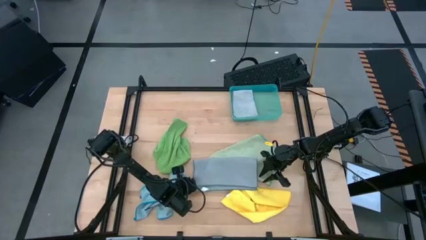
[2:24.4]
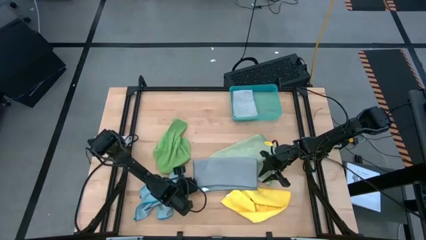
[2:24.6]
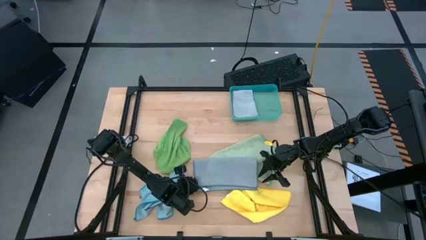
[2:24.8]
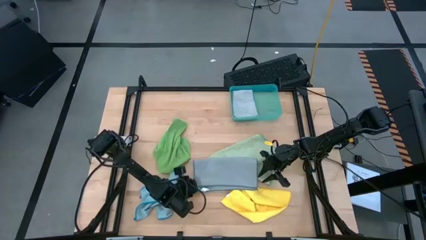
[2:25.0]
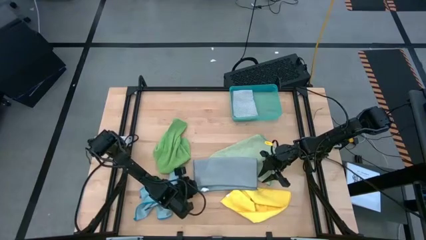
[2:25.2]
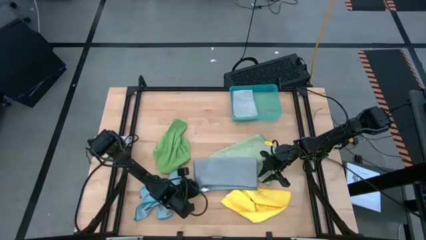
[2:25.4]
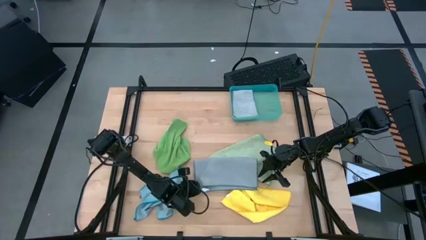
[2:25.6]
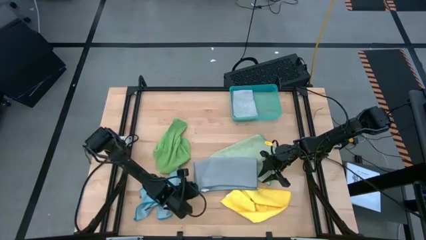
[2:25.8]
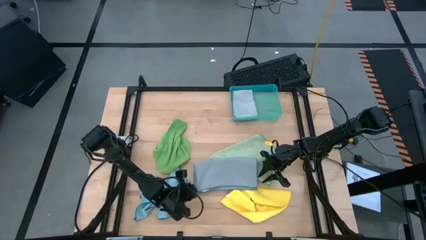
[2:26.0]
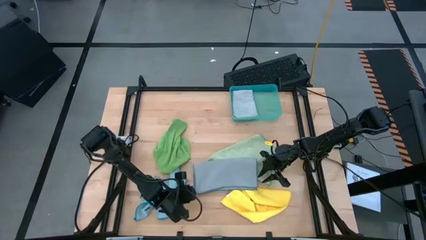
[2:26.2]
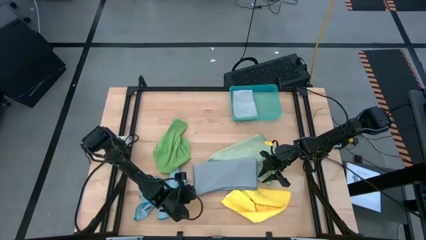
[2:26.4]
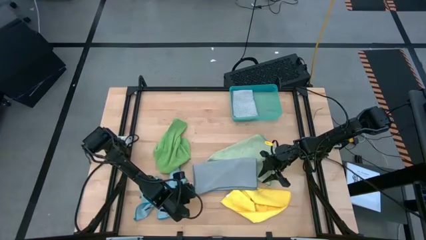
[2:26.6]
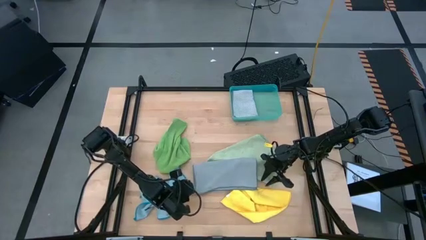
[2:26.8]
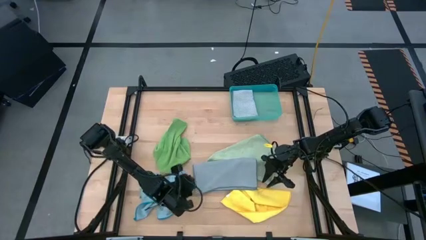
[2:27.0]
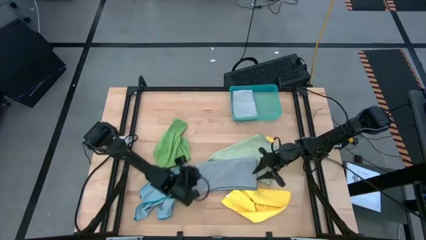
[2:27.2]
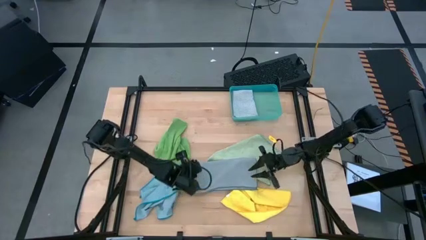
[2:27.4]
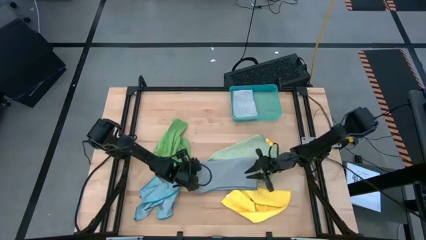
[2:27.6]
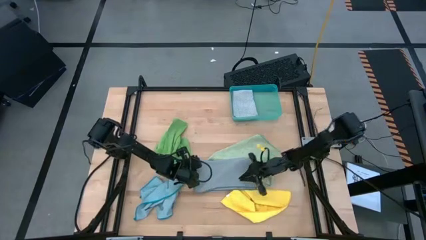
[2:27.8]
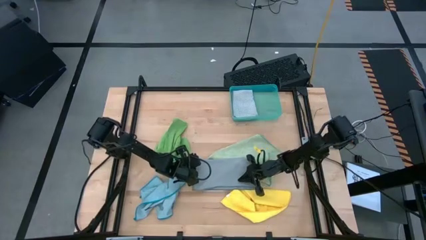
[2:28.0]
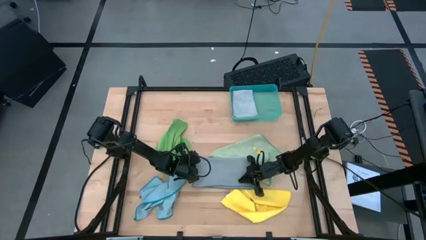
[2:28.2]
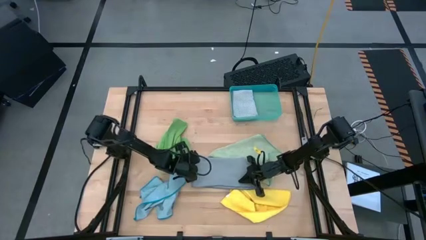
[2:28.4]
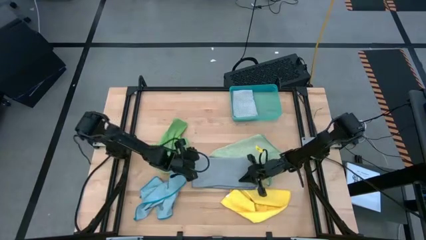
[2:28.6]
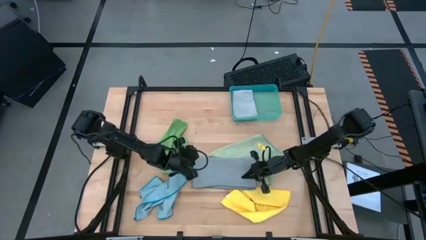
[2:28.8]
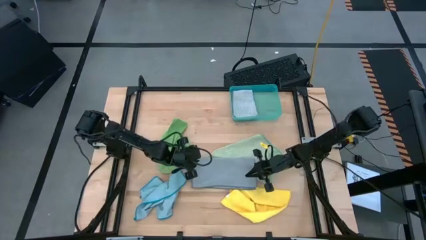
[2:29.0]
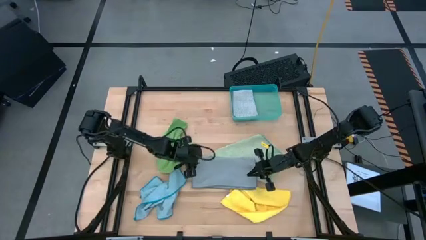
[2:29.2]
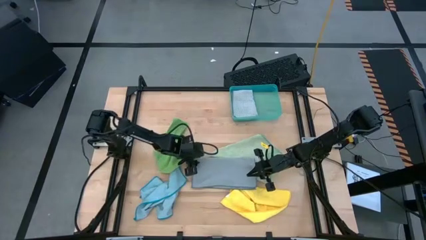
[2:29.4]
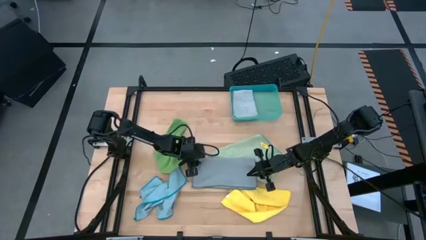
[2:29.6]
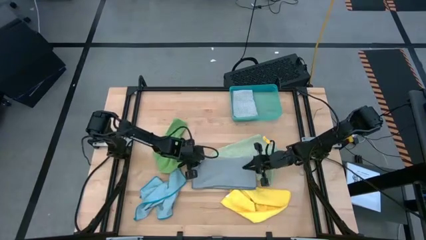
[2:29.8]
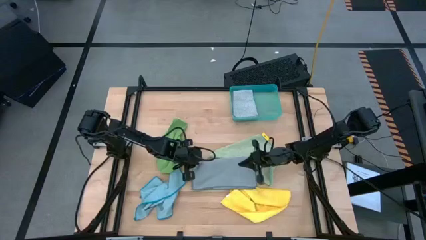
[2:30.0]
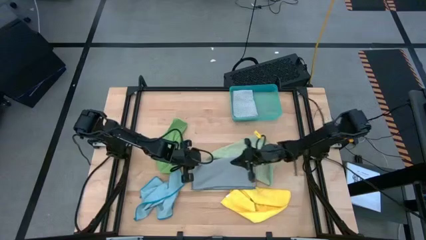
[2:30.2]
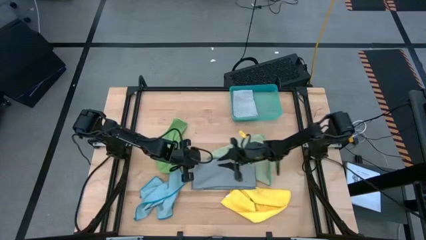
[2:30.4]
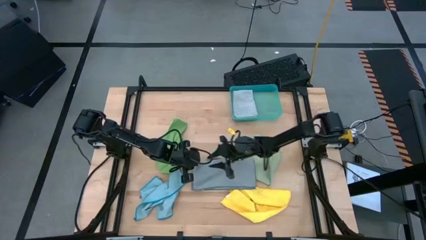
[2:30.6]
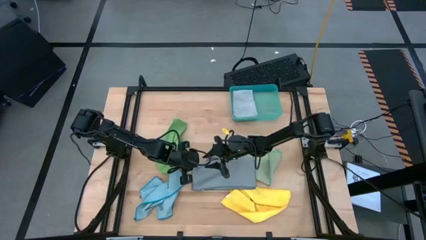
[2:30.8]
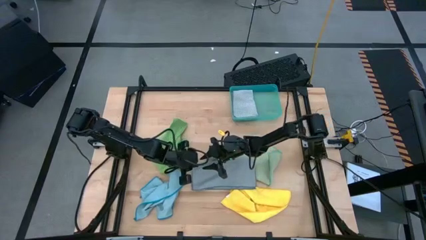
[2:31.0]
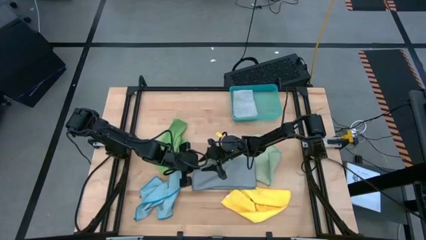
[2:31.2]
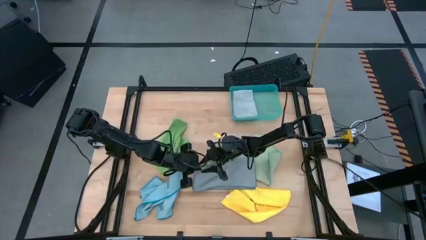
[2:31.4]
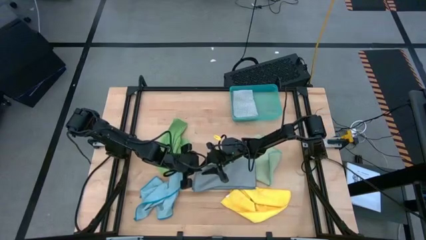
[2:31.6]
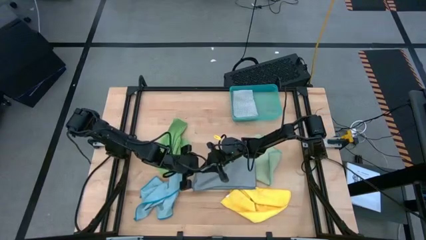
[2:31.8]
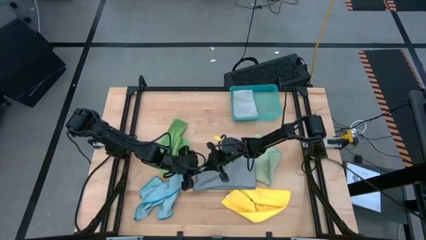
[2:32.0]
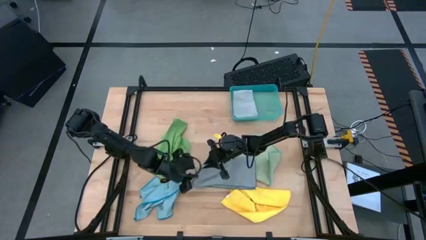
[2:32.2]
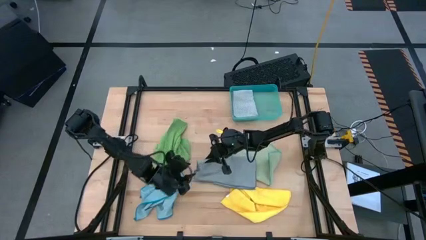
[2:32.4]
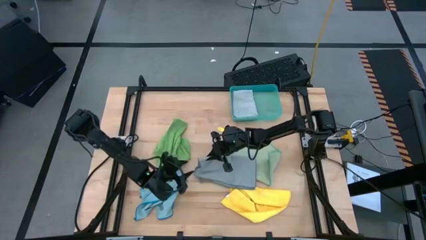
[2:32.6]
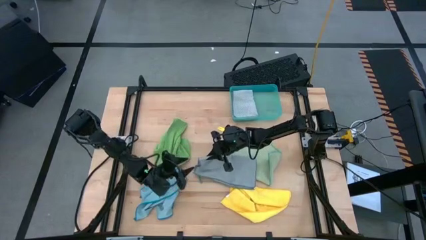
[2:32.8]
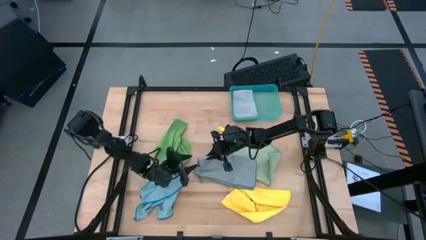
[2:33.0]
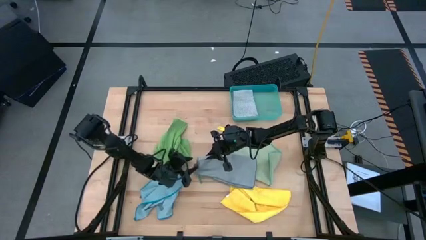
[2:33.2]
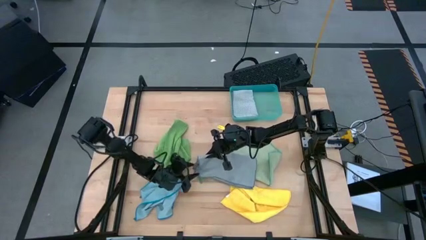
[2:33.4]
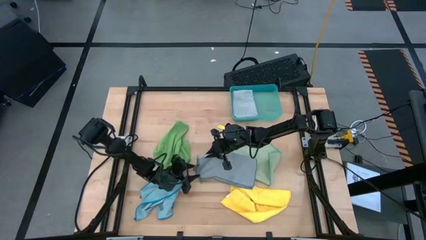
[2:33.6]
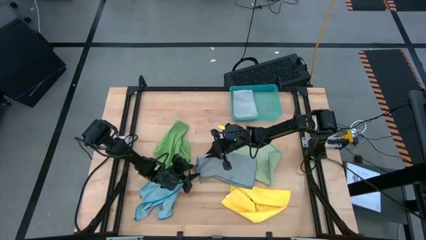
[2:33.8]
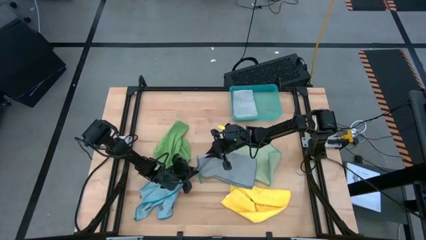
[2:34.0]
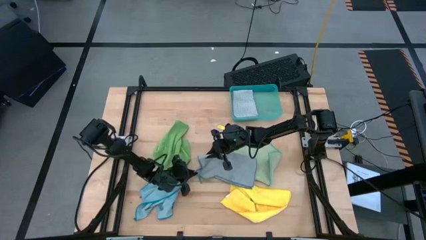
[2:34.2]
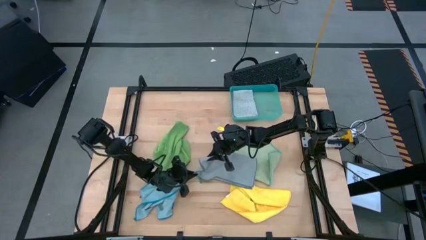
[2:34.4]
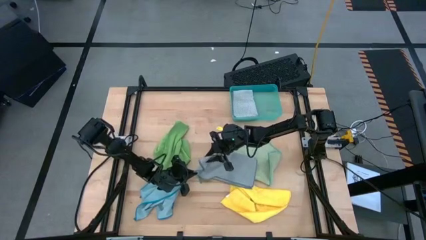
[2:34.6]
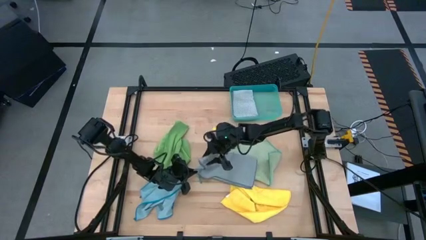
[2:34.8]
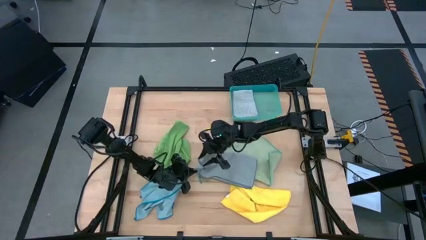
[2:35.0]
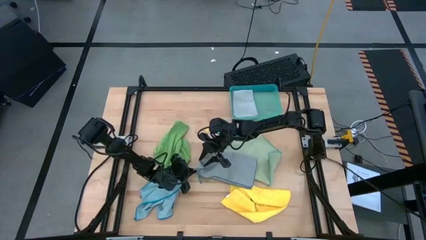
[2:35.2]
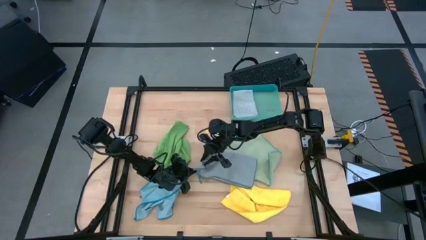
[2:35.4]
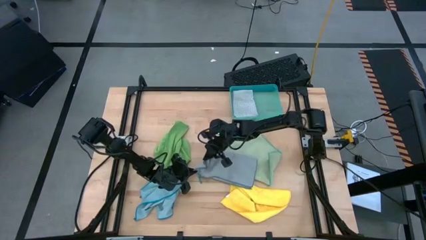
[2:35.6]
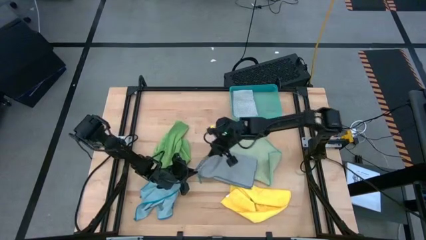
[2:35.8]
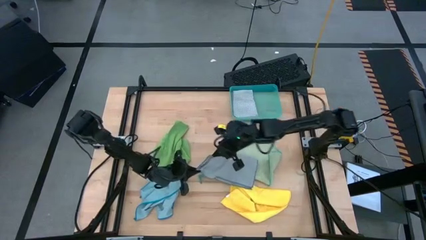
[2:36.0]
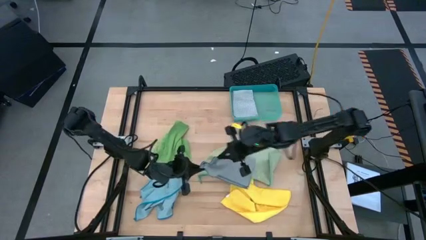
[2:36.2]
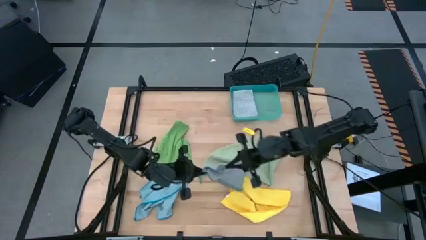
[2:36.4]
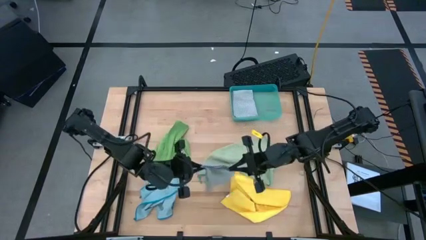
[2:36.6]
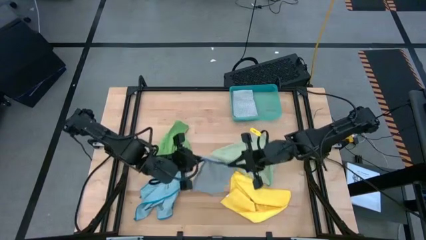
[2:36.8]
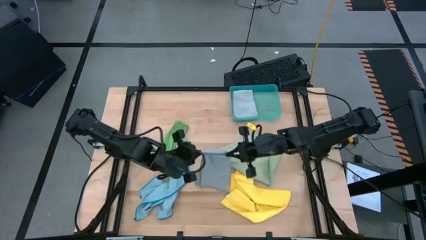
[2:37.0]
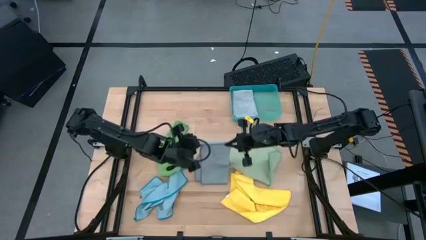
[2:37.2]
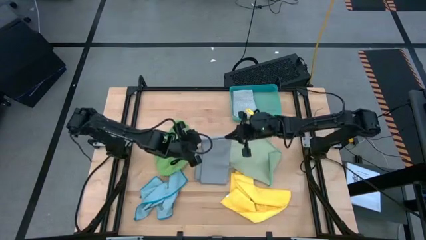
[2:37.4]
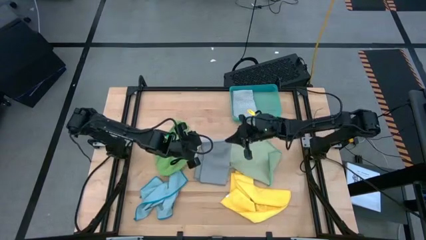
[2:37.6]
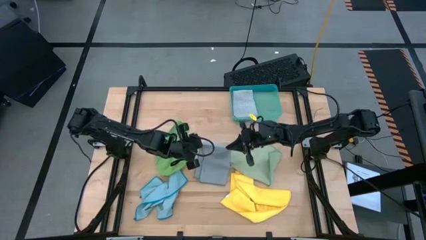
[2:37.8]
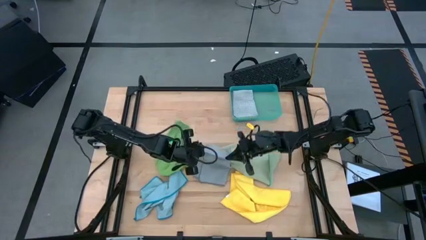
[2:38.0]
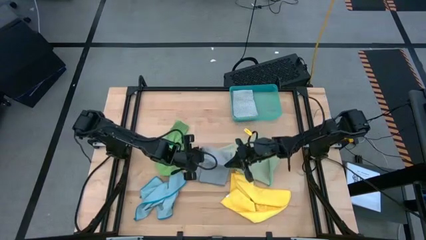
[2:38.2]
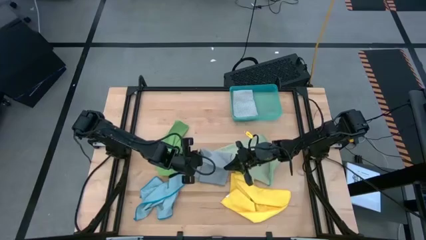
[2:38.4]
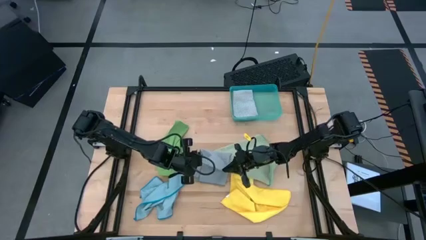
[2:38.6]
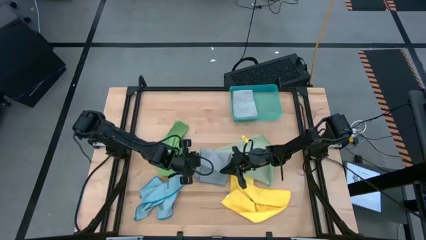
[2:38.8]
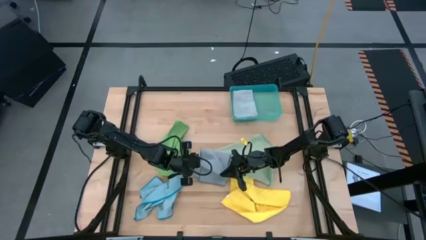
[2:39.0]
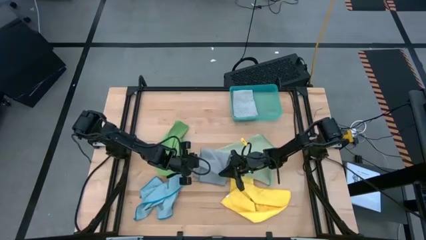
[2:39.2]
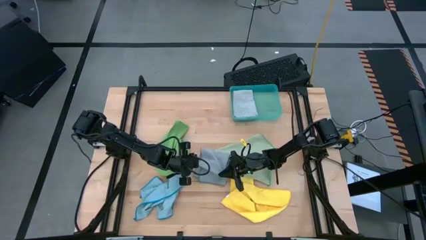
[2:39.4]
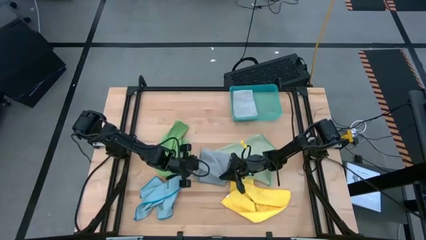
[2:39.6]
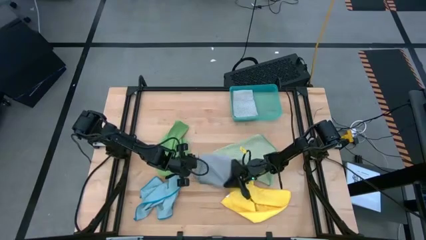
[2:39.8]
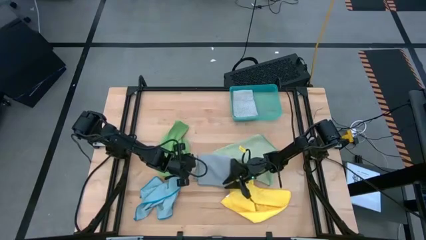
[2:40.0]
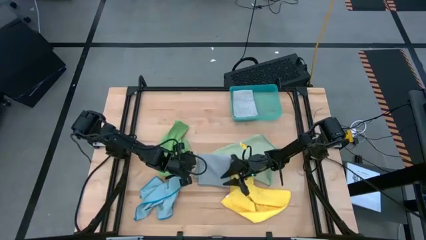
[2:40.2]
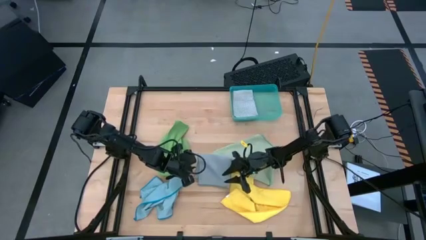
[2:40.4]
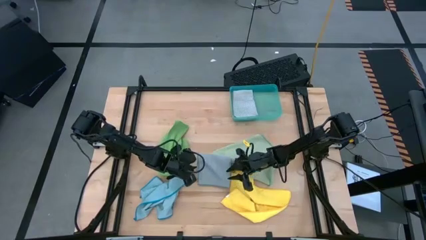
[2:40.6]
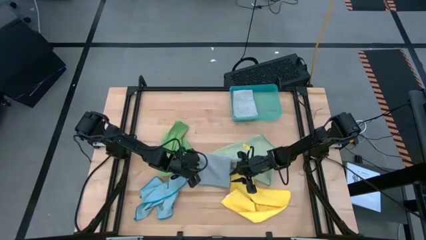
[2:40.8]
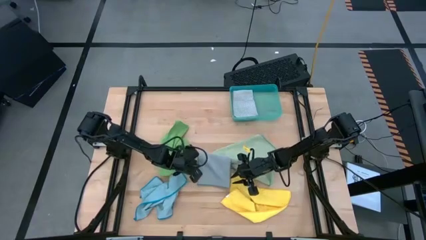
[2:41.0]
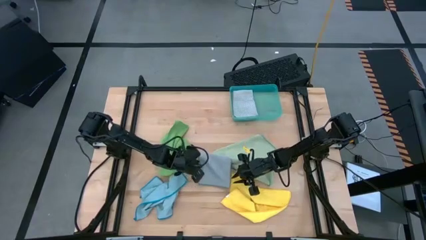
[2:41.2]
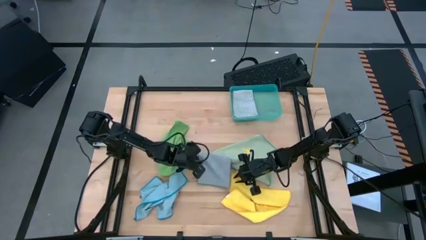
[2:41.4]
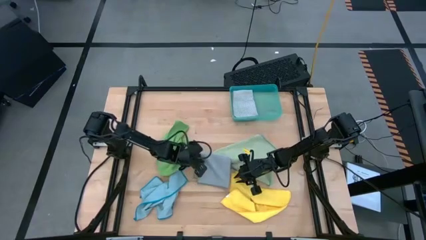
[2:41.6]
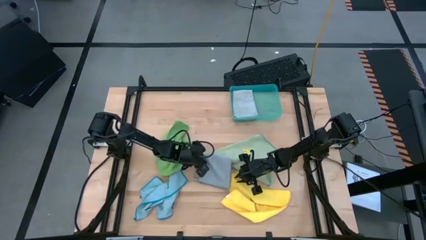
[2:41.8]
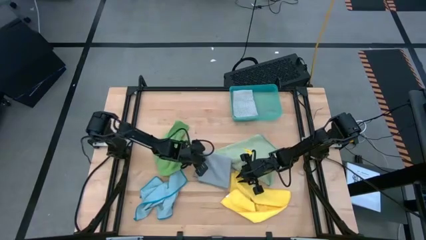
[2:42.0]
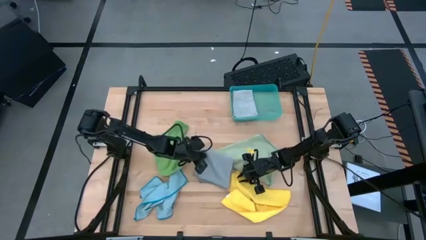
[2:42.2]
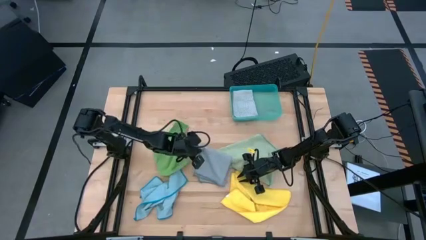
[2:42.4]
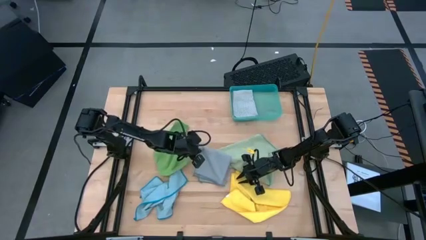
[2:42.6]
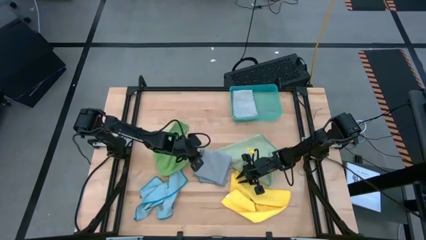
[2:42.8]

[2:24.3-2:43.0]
Task: Fold microfiber towels
Fold the gray microfiber cloth
